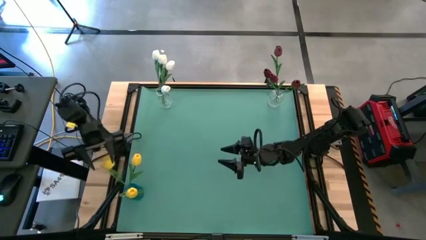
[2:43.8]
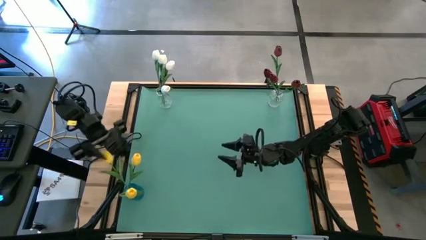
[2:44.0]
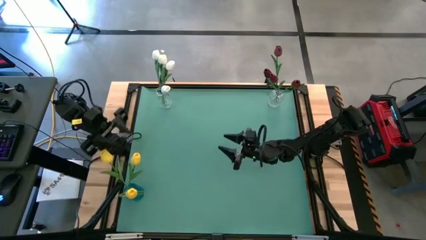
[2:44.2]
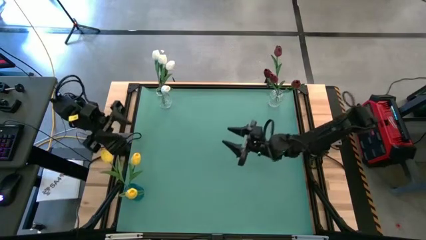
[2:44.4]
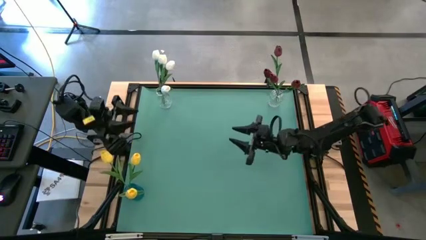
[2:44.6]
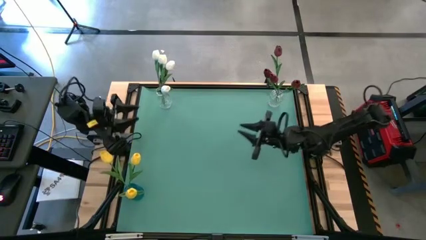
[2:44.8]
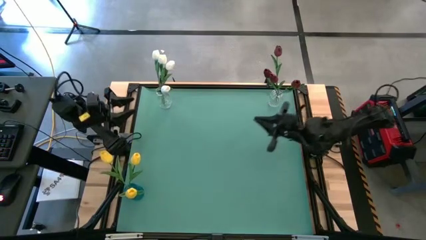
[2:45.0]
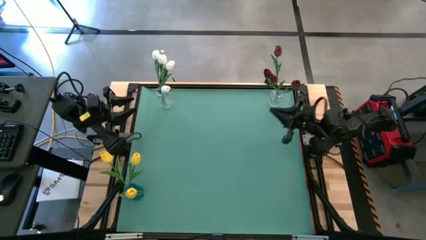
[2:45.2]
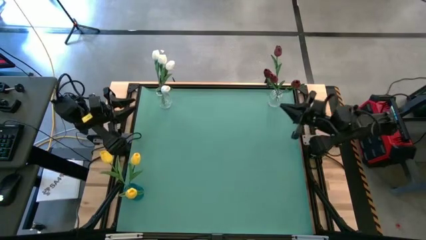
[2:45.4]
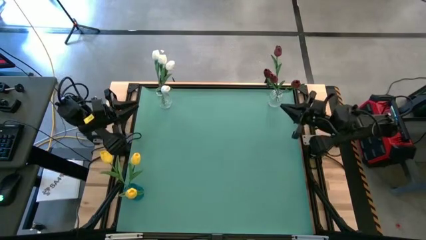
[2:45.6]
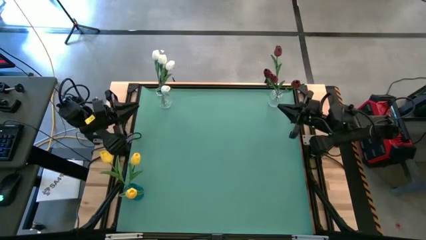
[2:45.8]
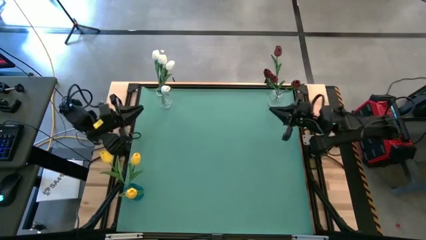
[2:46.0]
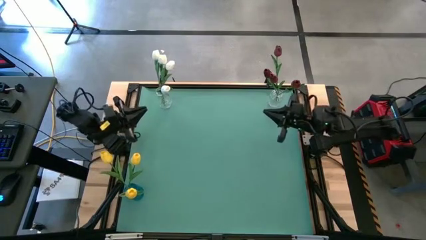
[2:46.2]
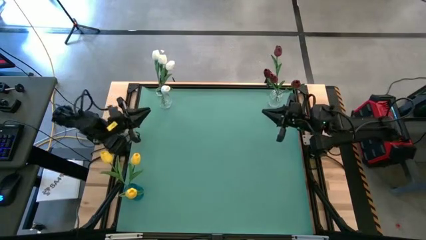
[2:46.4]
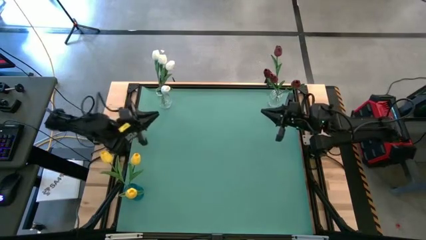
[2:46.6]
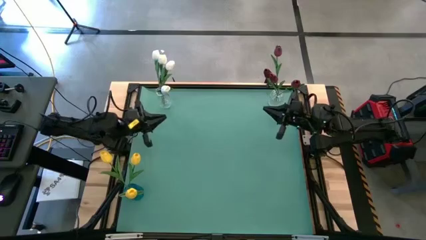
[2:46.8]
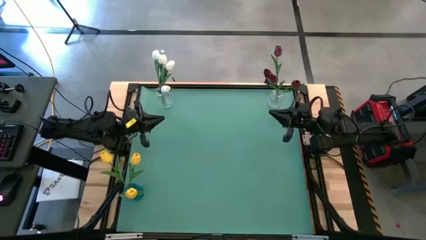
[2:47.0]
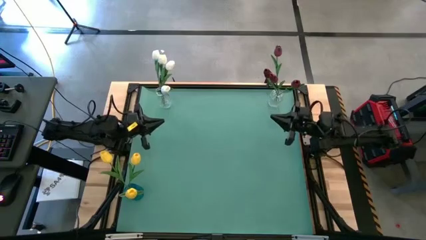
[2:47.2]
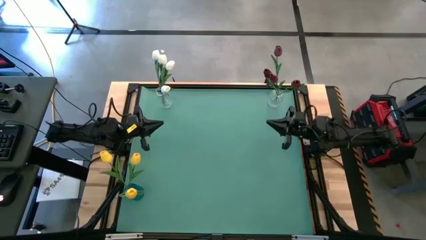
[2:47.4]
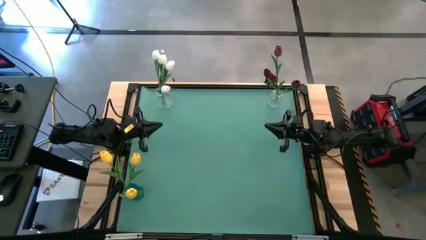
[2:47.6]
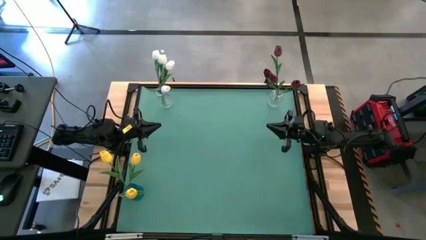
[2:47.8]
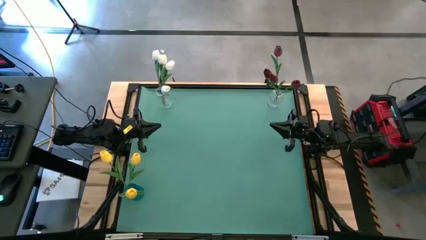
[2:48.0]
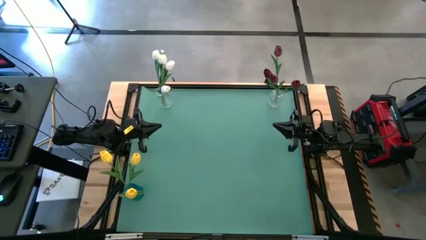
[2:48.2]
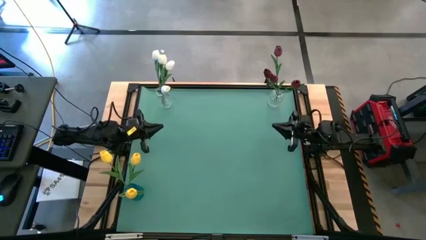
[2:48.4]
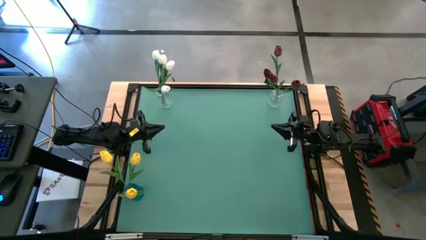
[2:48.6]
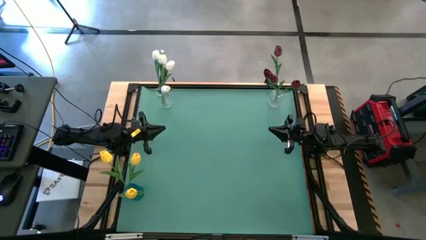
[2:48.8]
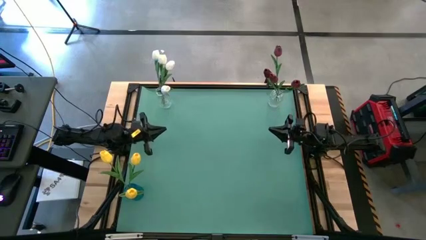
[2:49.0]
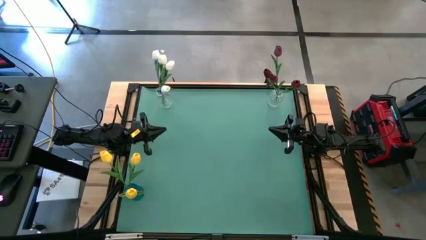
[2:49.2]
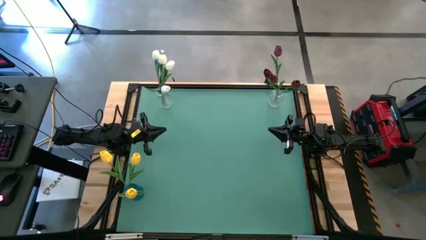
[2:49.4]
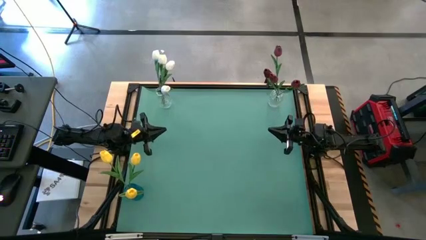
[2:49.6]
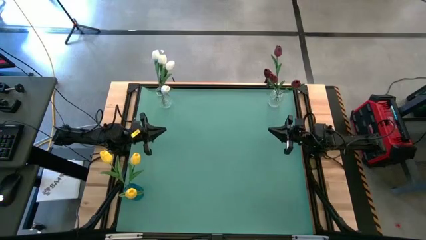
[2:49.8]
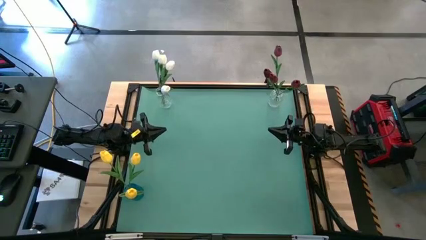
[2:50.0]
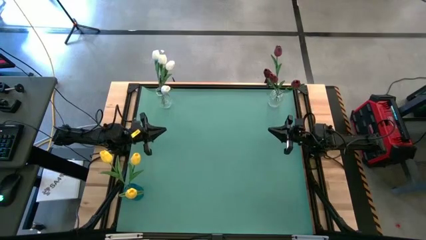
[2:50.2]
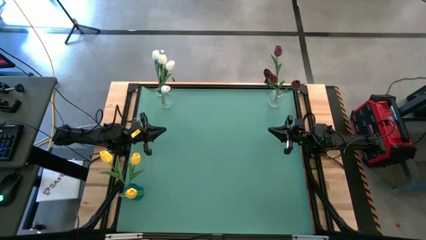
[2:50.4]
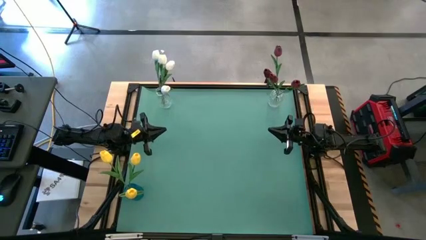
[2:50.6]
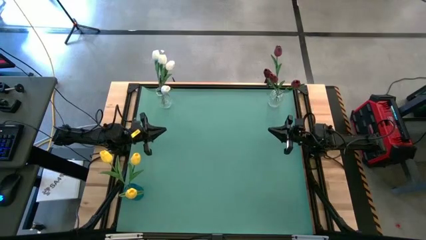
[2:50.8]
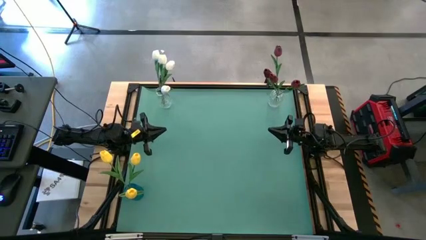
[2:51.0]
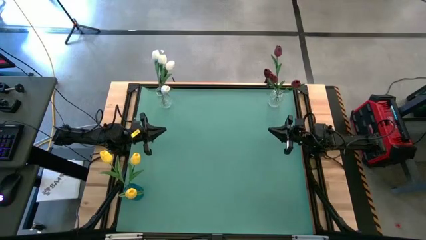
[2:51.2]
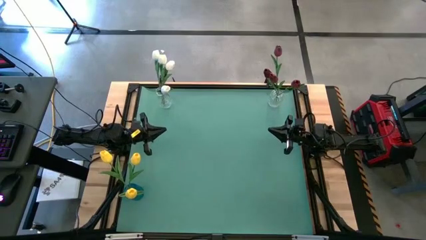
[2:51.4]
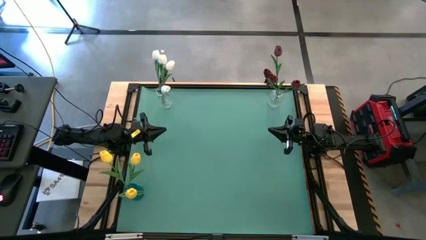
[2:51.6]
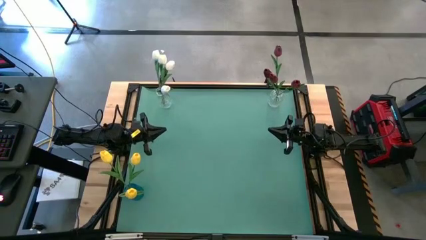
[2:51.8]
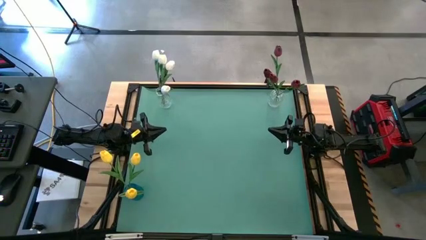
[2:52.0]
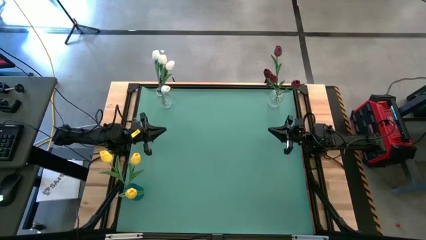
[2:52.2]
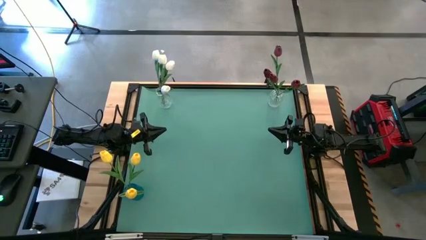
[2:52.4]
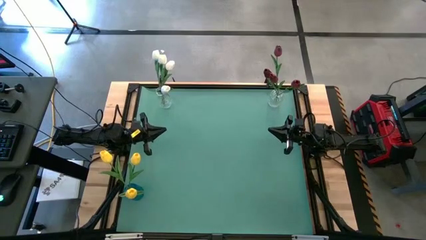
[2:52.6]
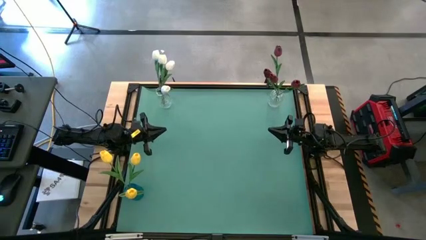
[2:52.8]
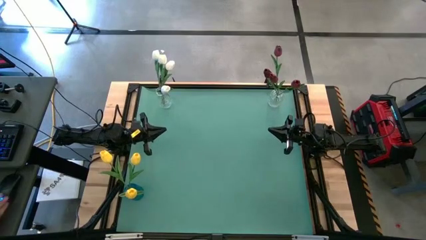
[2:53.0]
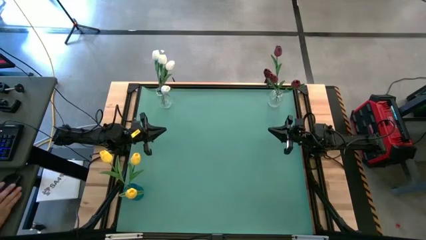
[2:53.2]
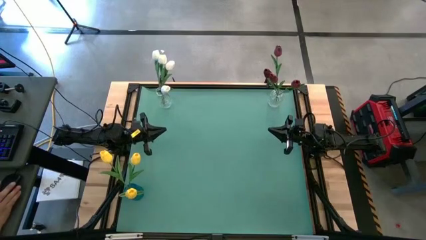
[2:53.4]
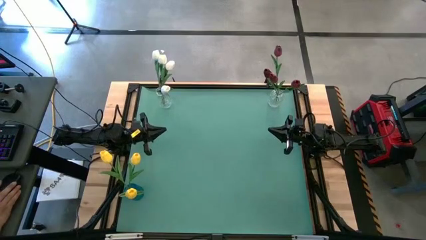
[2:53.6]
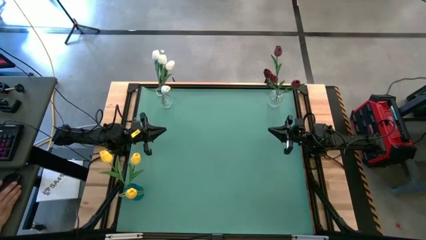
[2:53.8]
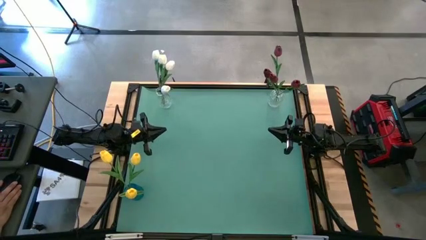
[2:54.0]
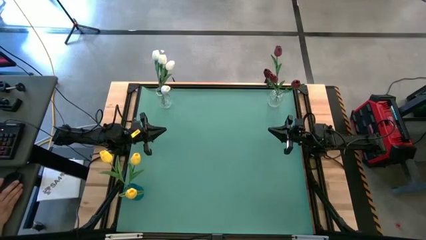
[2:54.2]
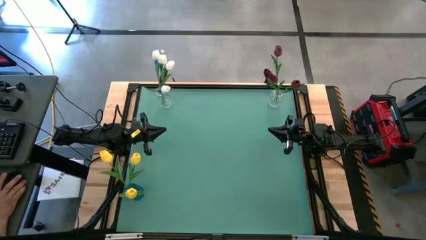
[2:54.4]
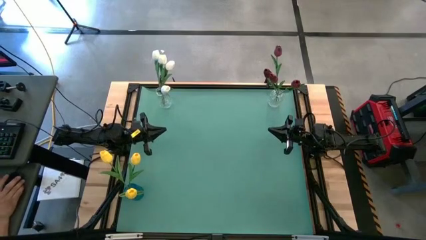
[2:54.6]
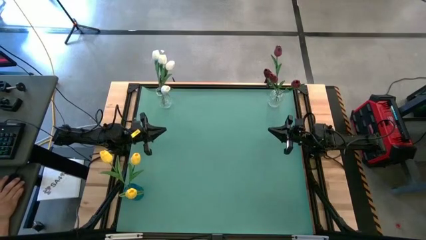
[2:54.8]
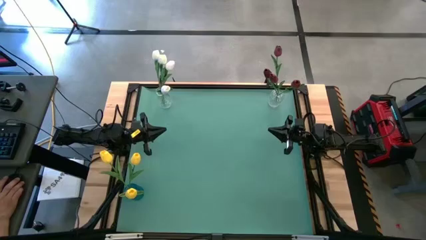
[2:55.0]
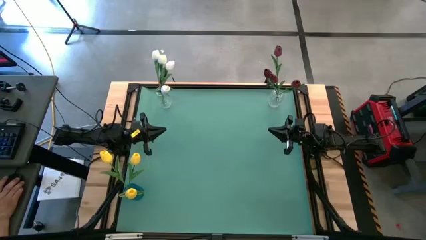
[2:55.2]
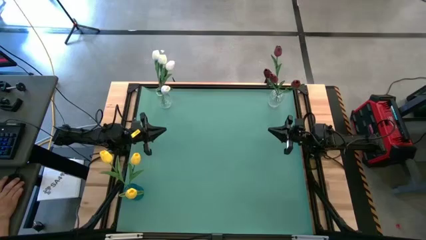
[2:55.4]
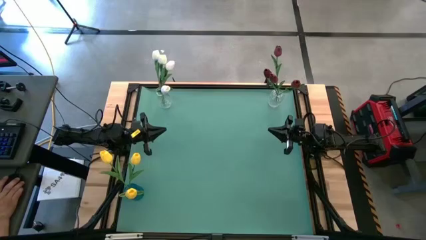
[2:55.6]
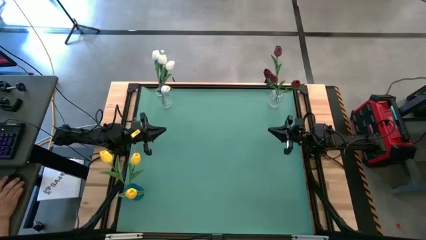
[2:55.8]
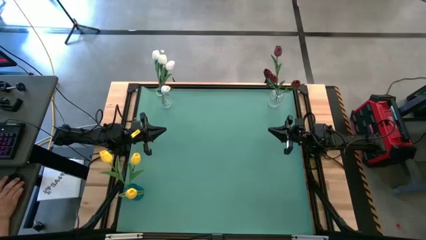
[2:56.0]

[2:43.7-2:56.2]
Task: Sort flowers into vase by color
Return to Home Position

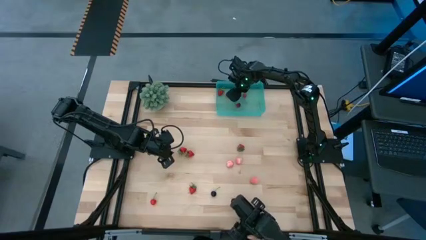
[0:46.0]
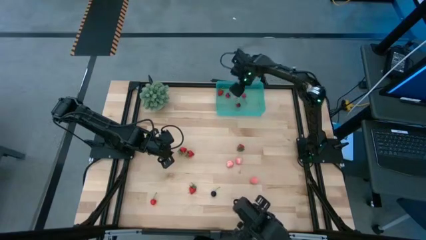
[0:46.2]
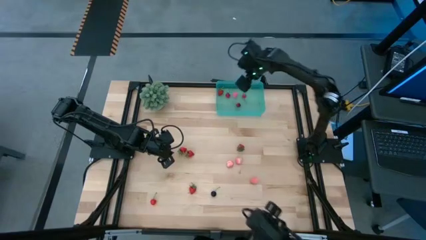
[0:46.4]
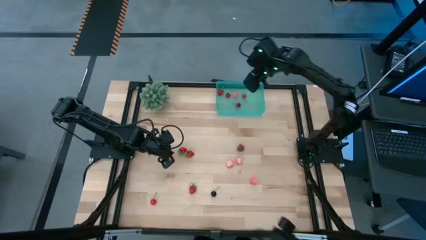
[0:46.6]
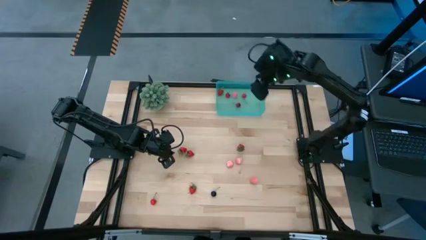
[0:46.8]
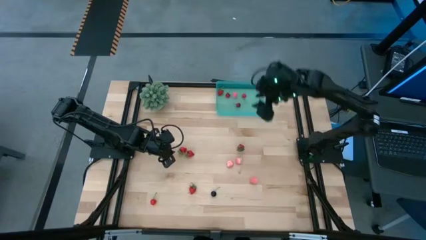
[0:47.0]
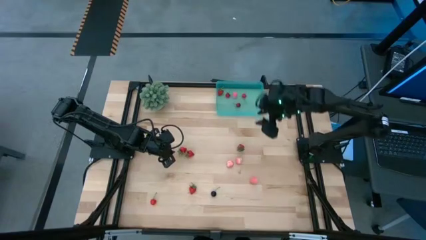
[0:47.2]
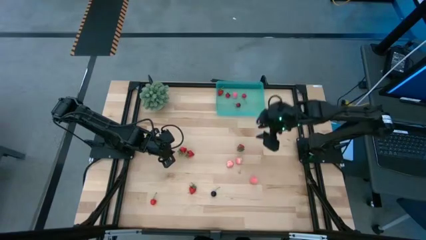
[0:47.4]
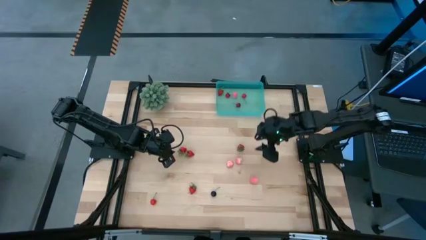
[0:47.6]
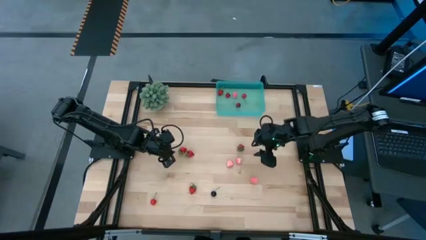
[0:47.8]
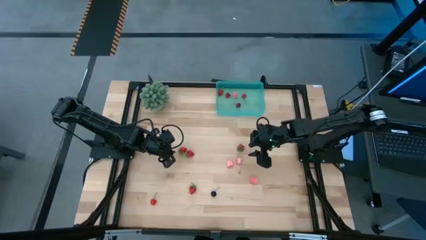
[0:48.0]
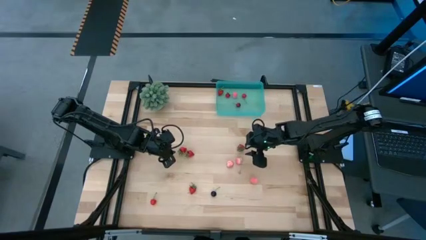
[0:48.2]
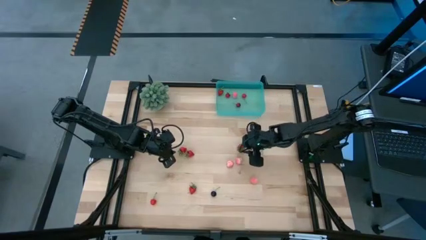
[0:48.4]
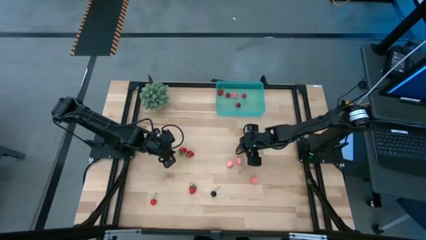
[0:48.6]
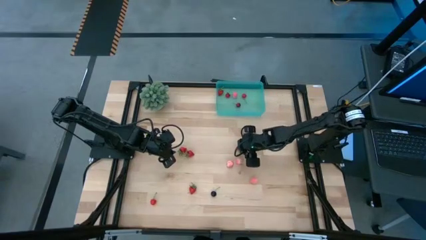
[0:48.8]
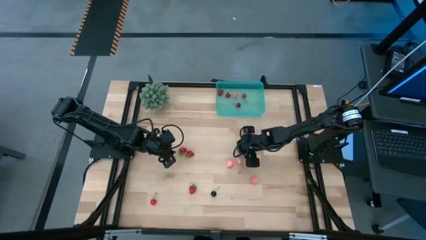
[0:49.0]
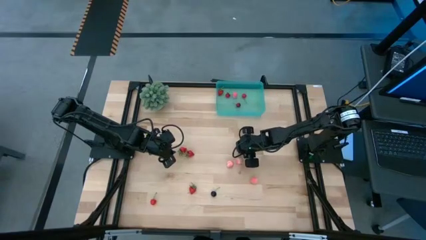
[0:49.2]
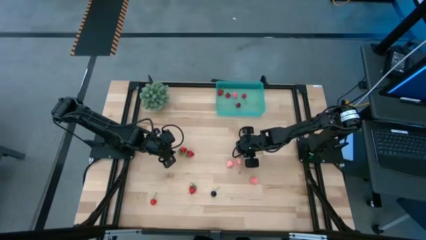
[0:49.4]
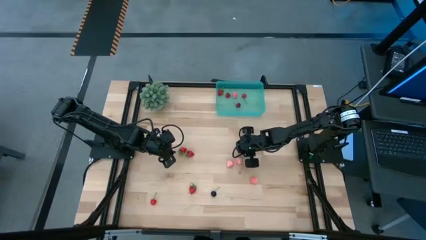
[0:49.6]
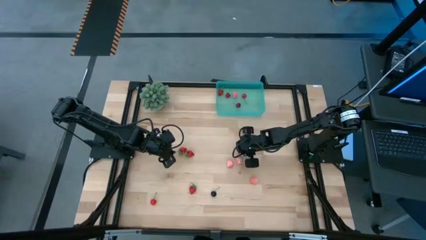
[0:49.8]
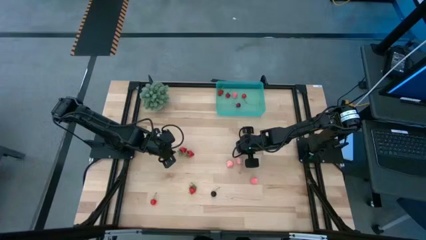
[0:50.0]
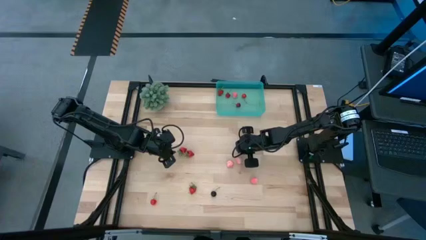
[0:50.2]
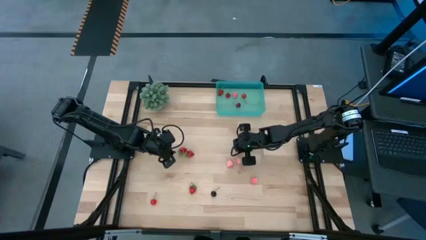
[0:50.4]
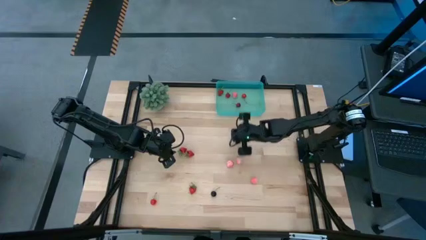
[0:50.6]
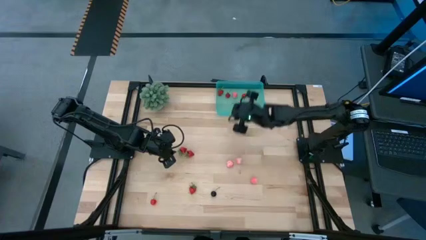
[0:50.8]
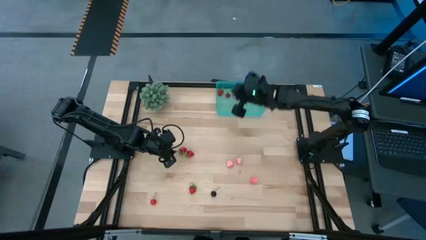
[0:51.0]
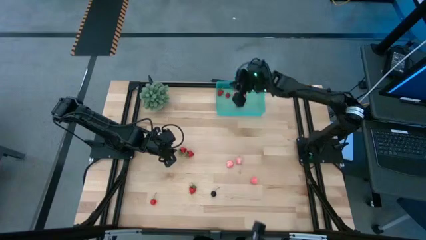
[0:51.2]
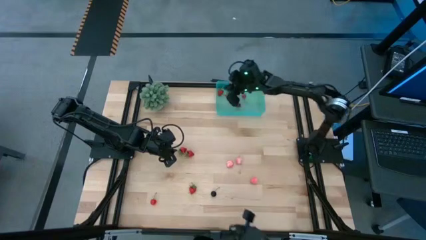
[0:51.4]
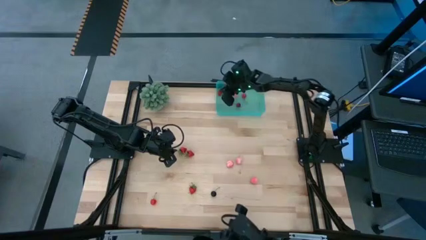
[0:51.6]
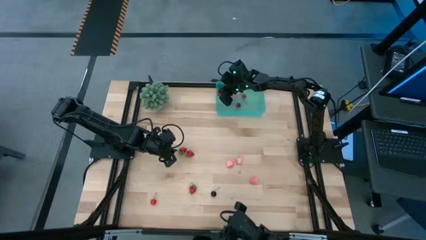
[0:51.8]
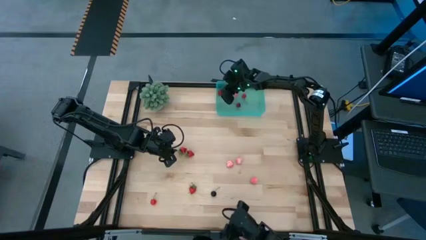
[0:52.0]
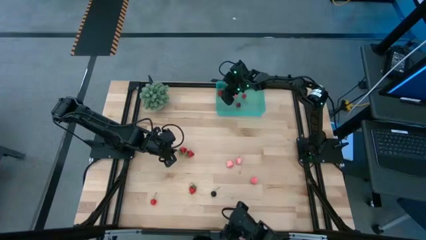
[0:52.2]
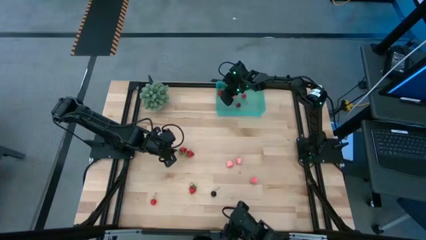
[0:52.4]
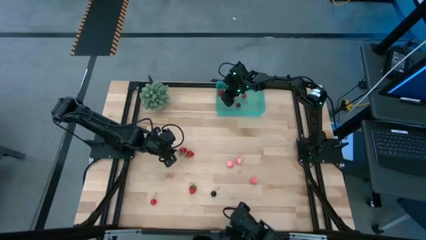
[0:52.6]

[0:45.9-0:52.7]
Task: Pick and placing Produce into tupperware
Put the strawberry into the blue bin
